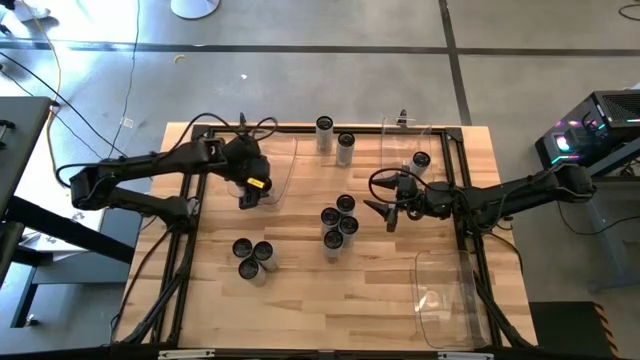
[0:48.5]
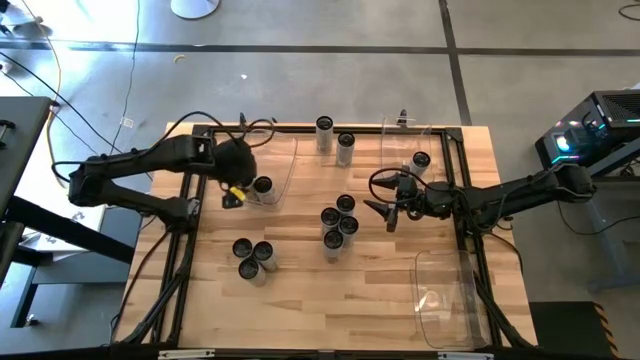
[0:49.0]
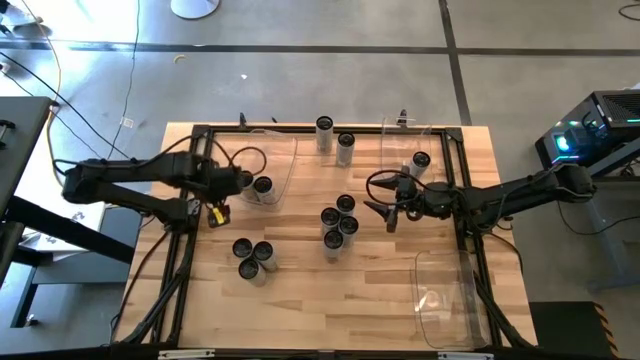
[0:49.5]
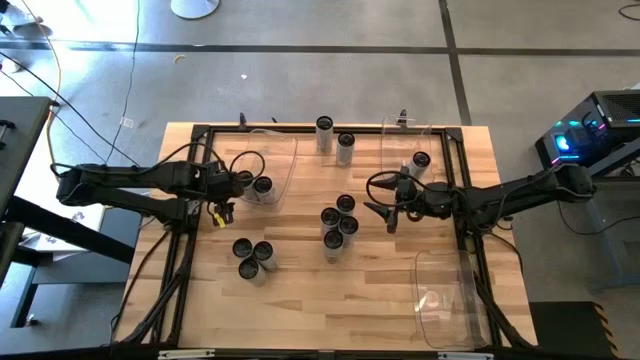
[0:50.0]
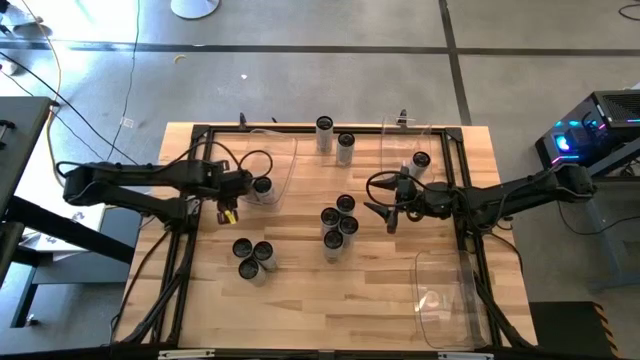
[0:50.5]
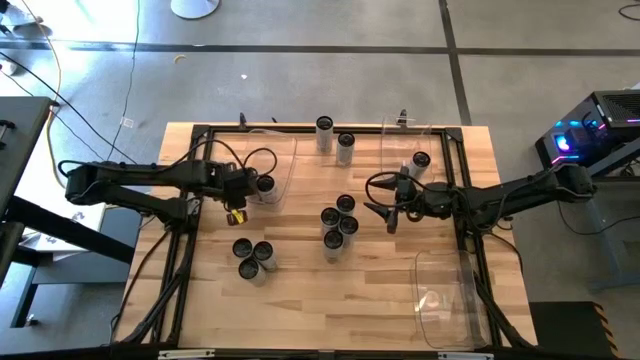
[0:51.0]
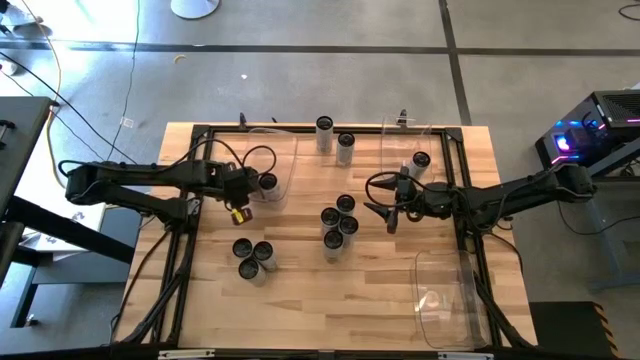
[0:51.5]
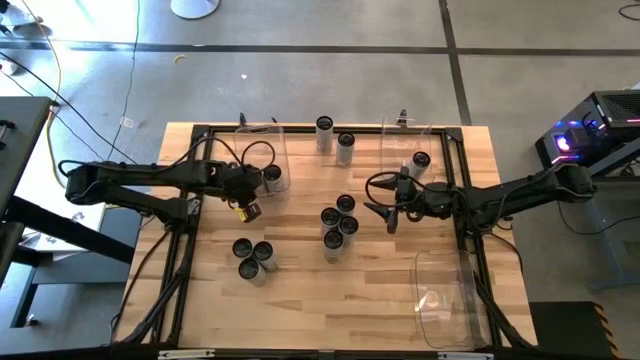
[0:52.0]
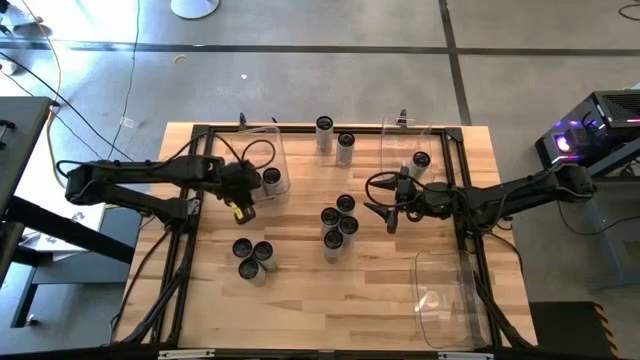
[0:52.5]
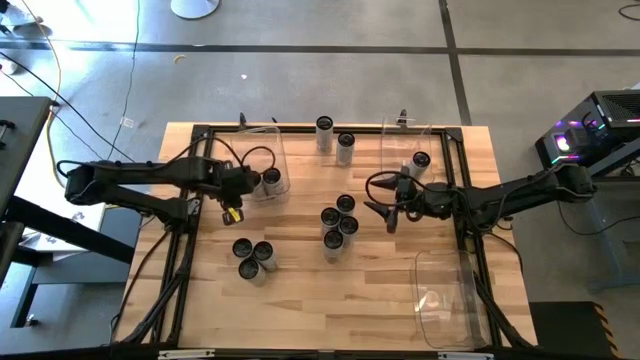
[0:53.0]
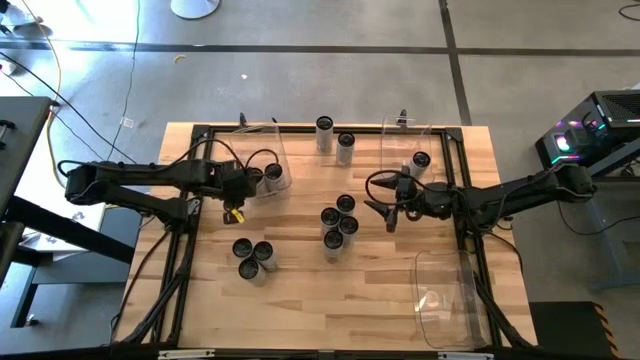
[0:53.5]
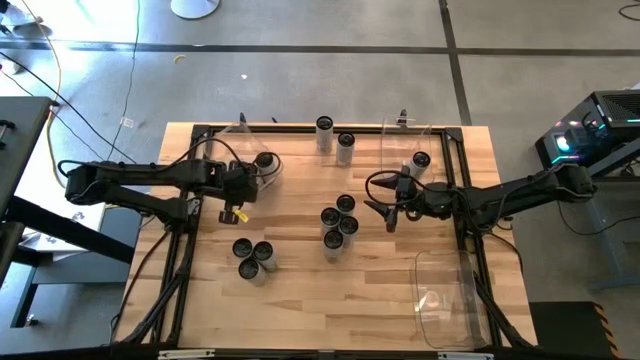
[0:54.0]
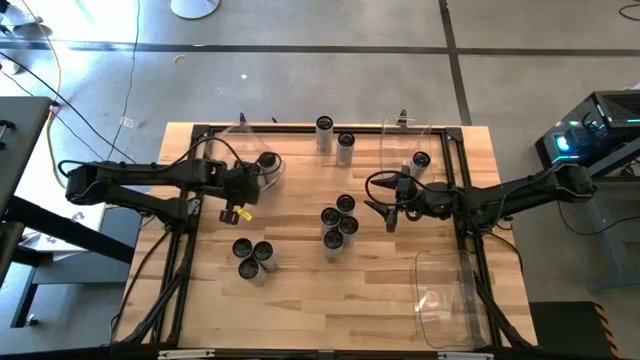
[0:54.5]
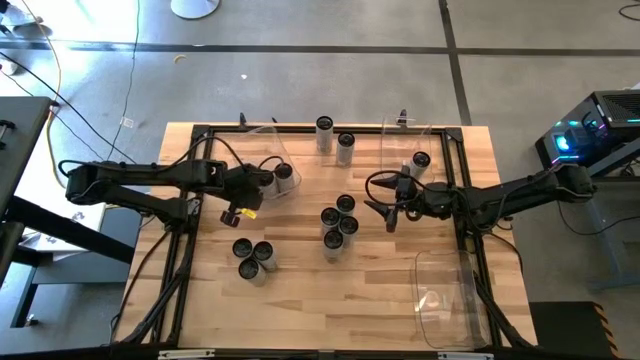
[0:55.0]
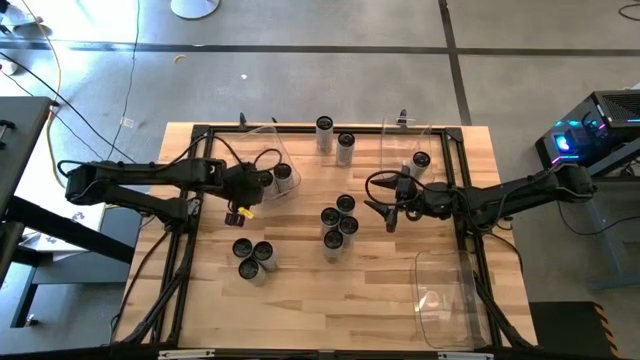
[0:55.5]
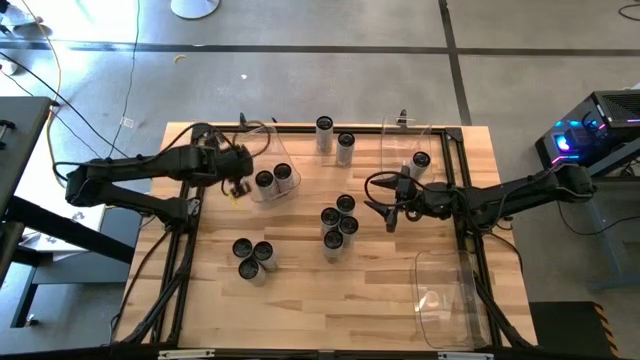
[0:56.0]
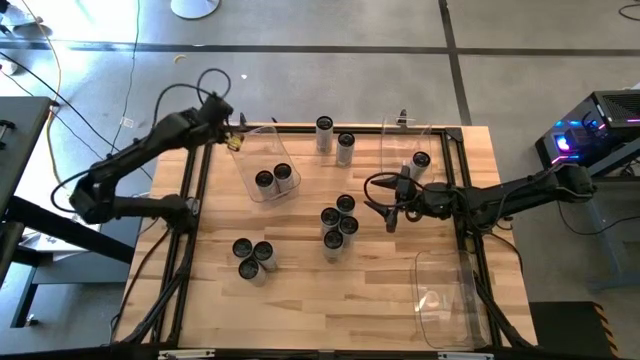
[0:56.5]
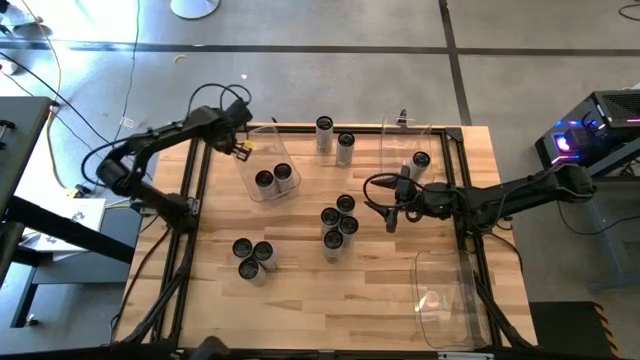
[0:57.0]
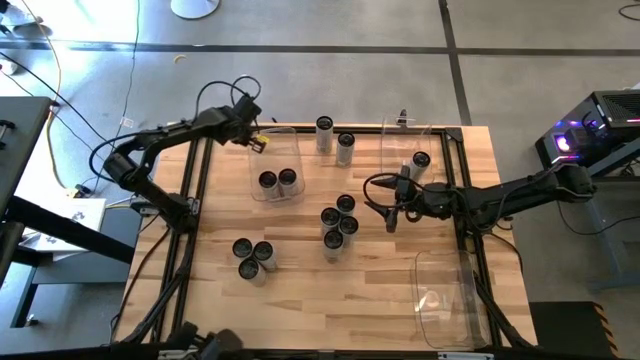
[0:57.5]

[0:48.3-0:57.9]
Task: Sort soda cans
Adjust the top left transparent bin on the table

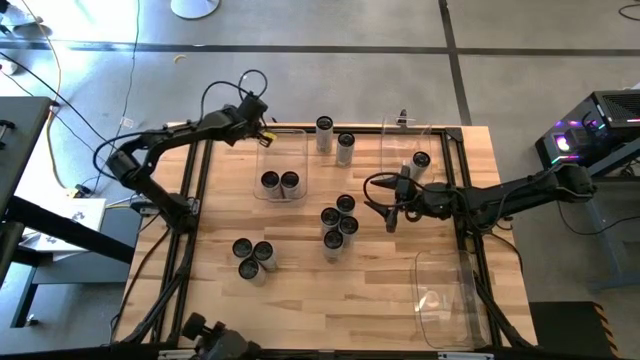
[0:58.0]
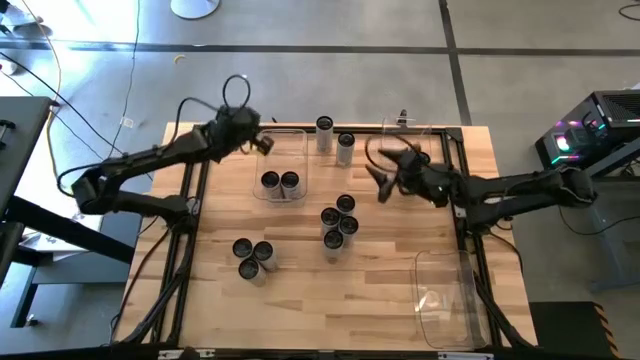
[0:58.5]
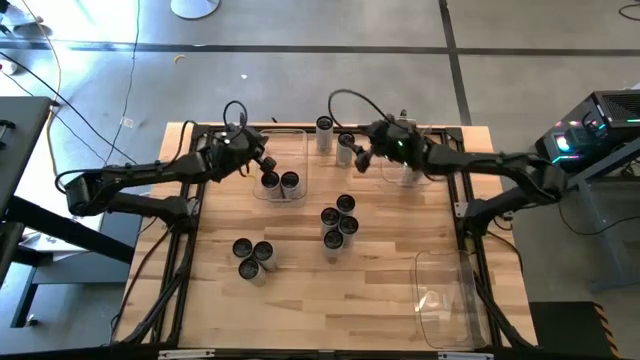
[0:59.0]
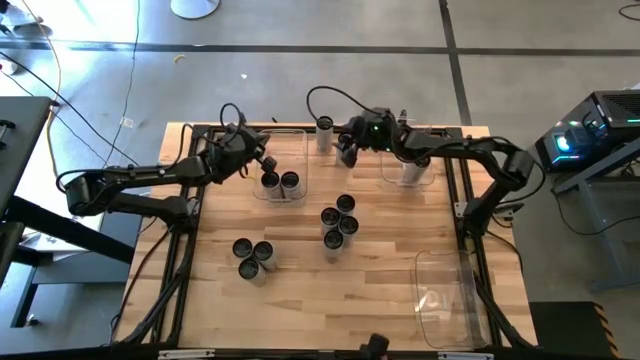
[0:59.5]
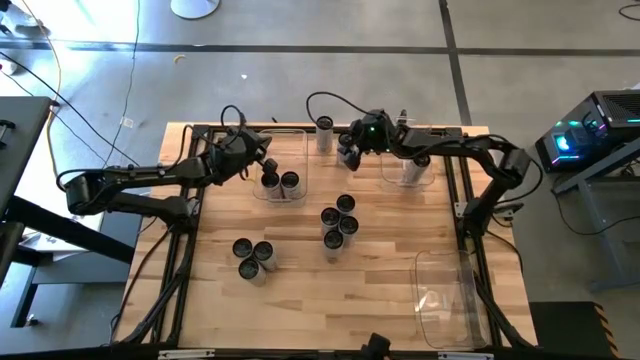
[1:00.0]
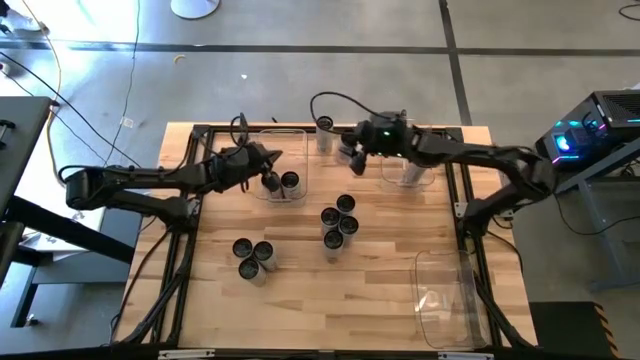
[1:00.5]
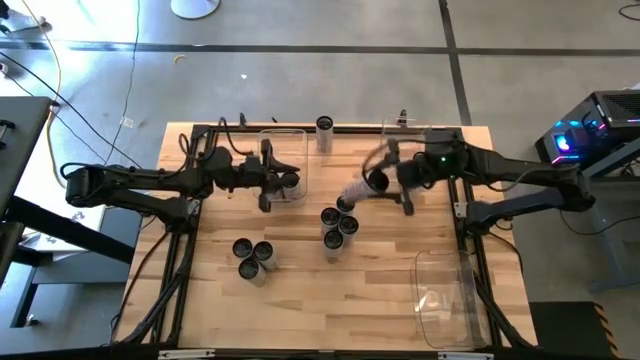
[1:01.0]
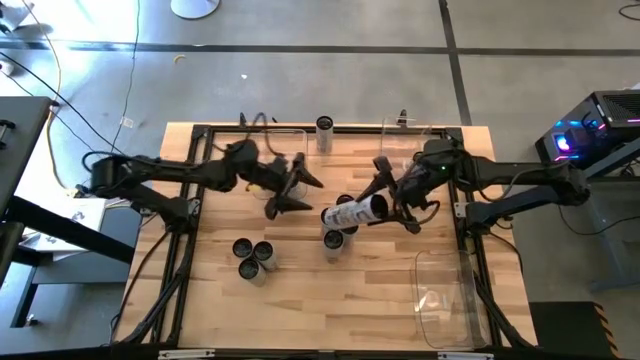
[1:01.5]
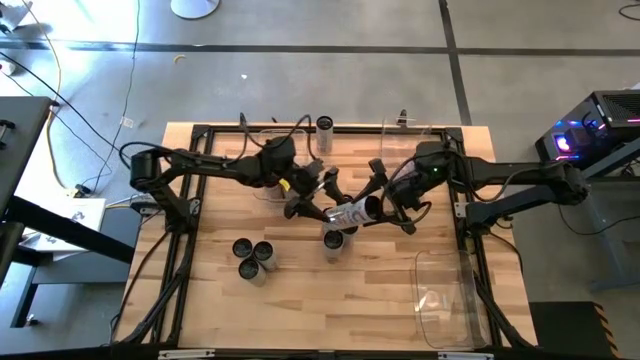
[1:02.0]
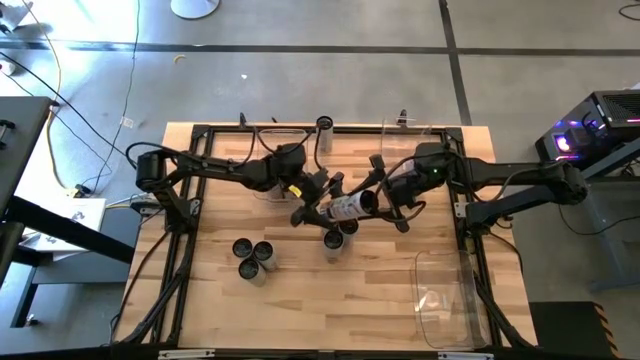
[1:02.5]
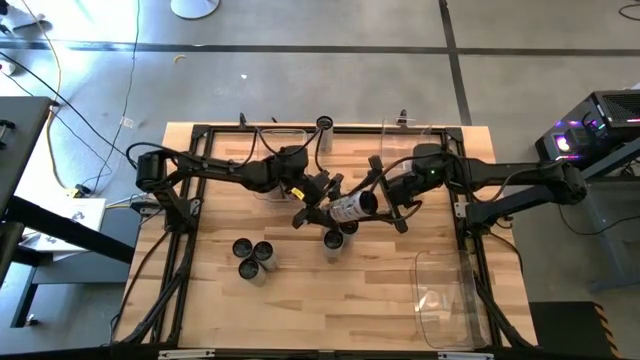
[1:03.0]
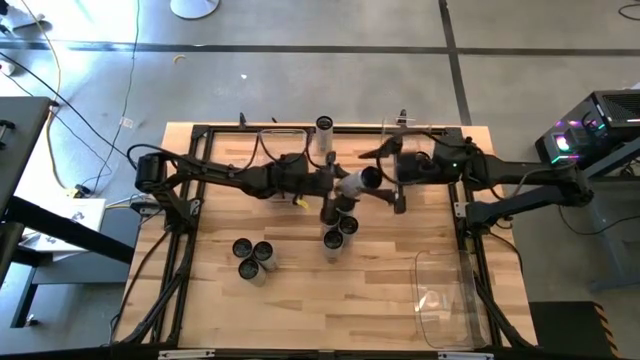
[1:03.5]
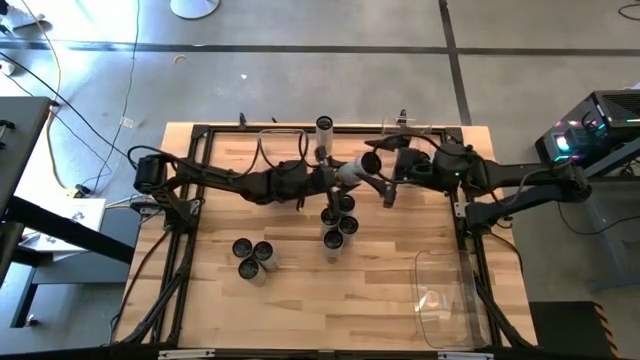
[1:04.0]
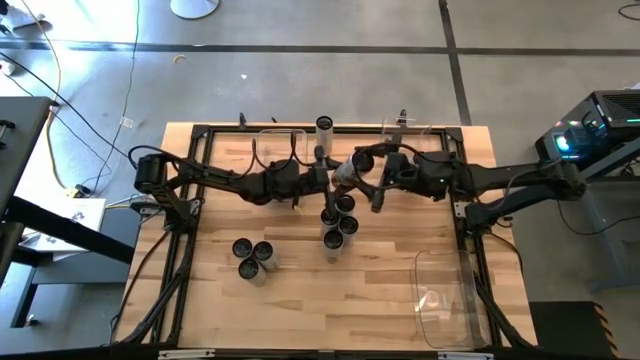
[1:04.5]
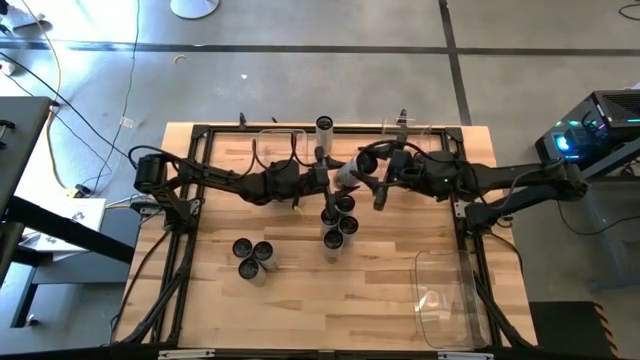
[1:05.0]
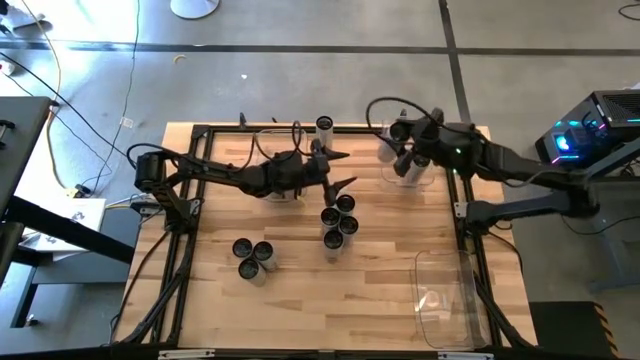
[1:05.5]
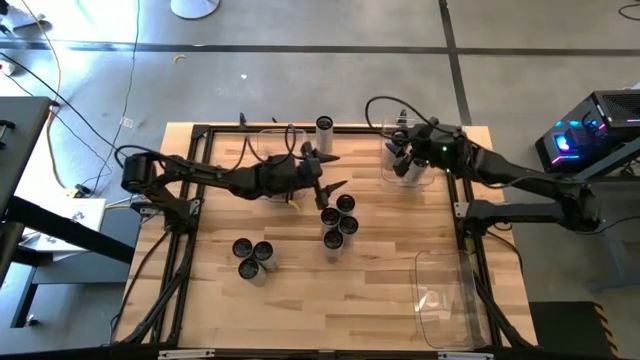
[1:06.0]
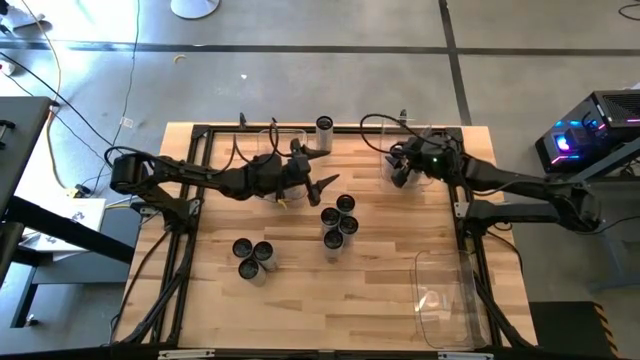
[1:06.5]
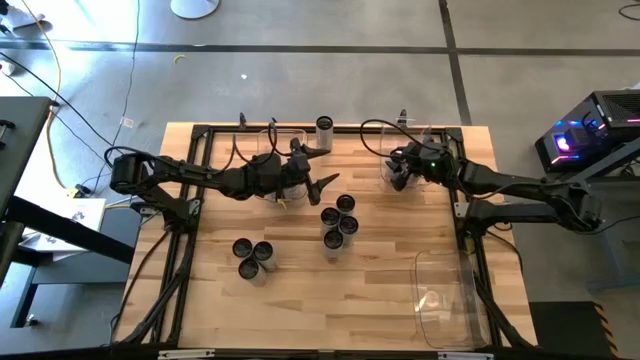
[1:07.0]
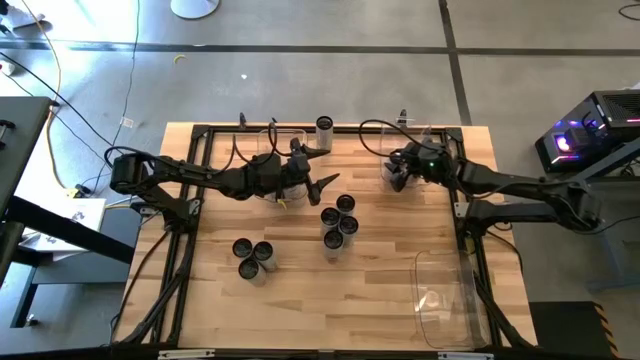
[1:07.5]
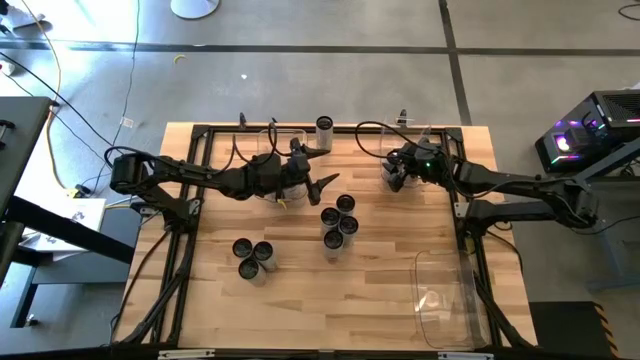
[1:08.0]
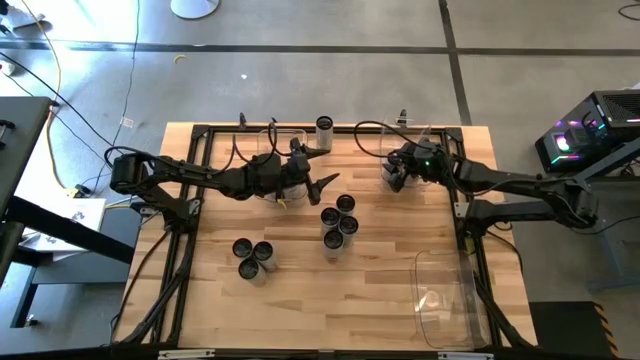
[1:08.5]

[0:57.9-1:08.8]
Put the white-yellow soda can into the top right transparent bin
